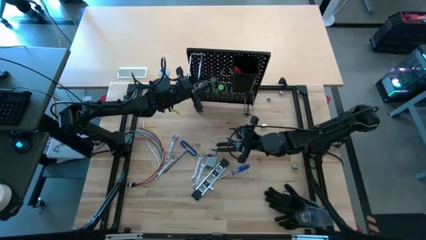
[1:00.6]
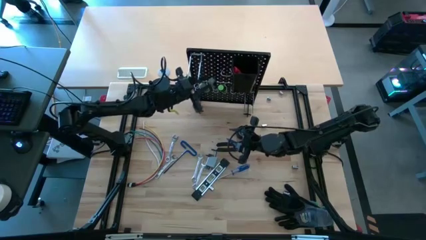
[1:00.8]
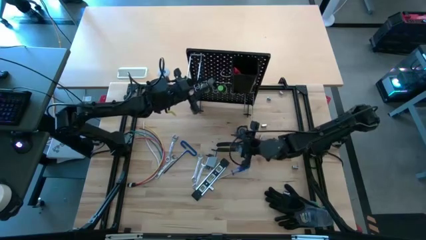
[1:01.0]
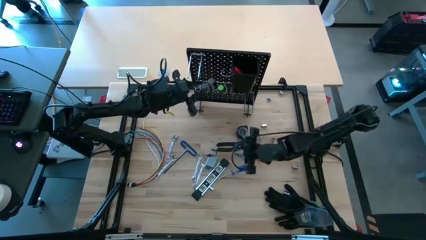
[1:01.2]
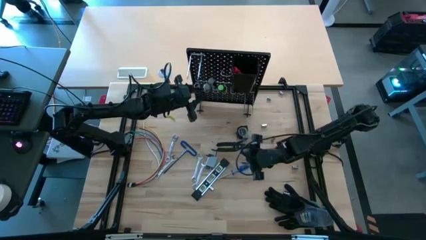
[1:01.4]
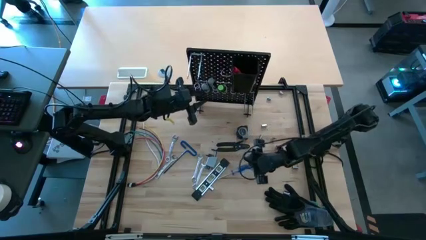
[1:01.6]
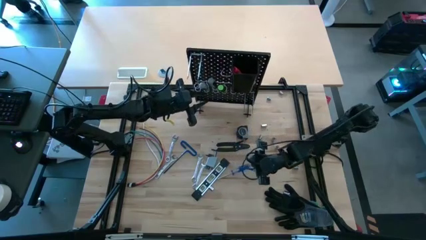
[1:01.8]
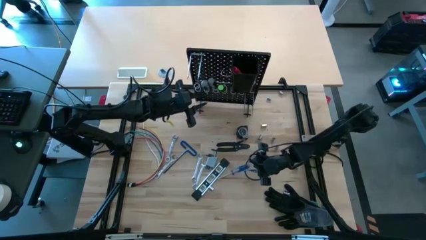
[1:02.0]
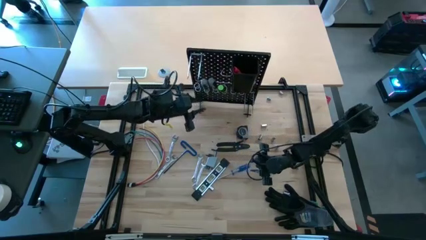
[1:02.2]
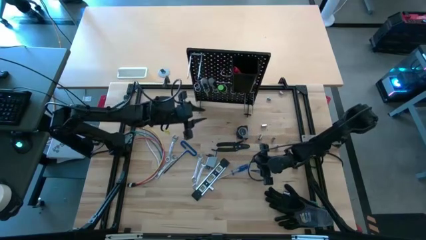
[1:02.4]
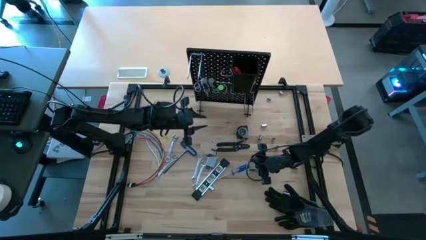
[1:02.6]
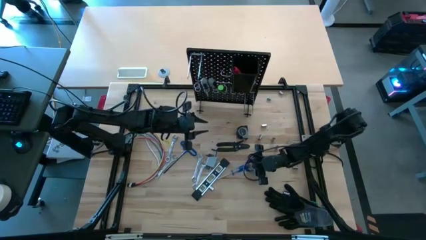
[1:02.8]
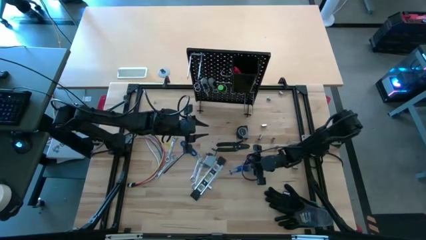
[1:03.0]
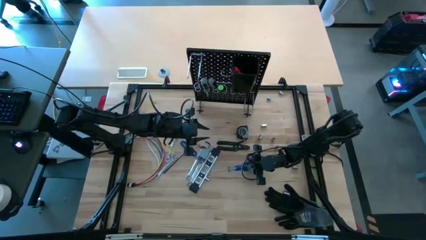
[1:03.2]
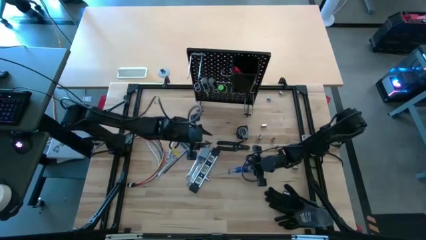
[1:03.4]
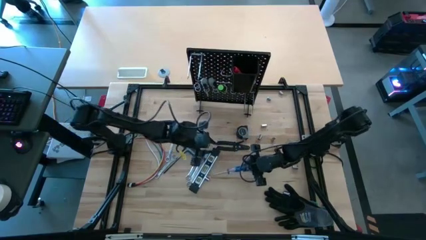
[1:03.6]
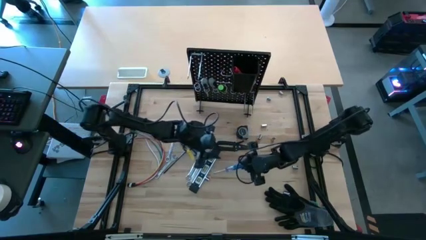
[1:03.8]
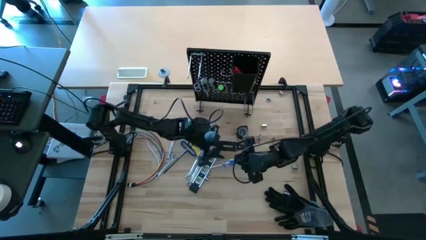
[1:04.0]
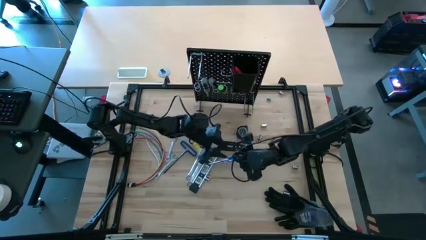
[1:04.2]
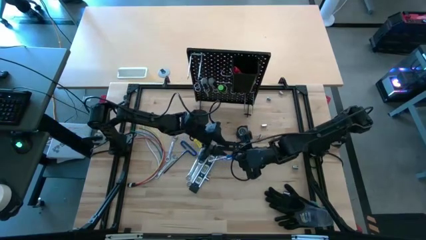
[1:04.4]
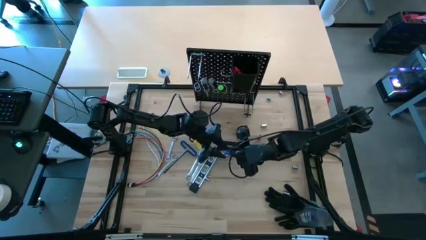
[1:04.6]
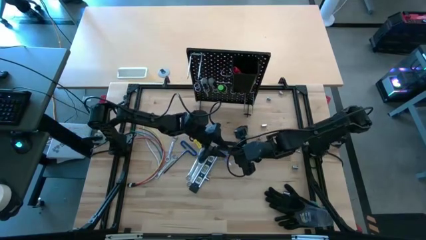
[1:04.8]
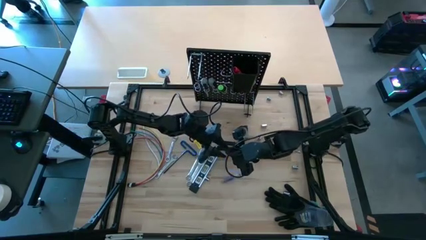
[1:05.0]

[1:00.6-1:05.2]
Task: Hang tools onto peg board
Hang the blue screwdriver on the peg board

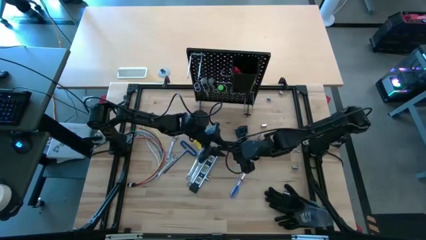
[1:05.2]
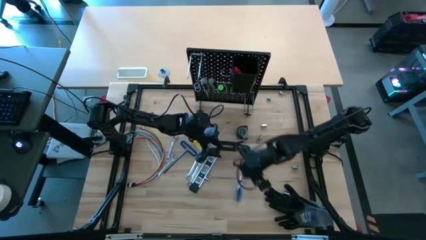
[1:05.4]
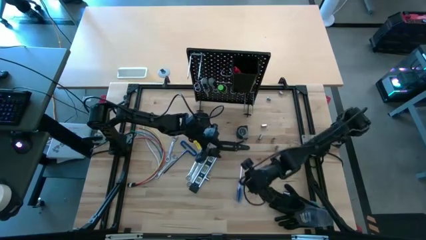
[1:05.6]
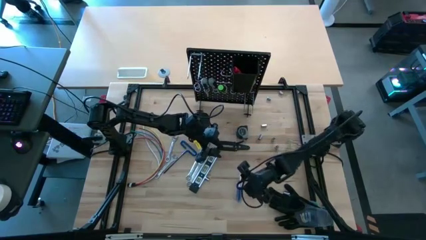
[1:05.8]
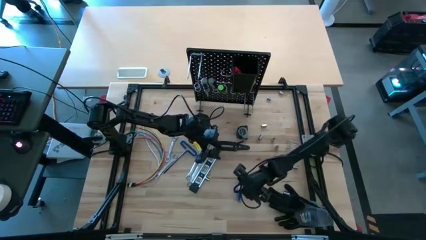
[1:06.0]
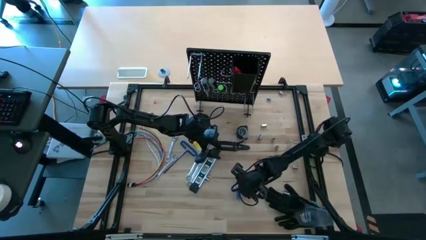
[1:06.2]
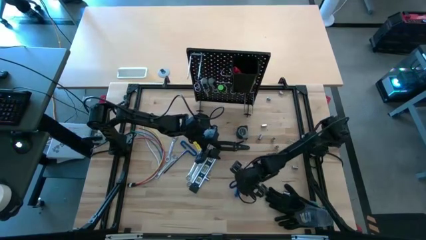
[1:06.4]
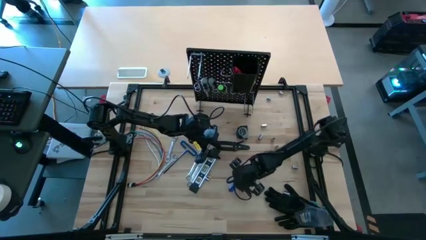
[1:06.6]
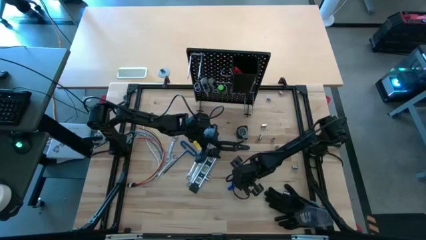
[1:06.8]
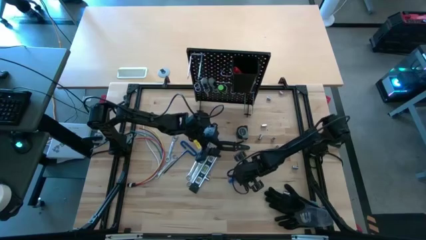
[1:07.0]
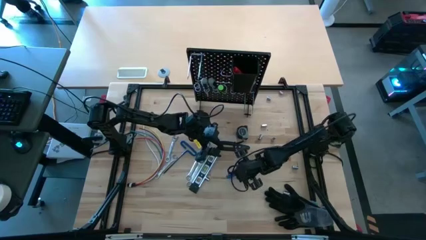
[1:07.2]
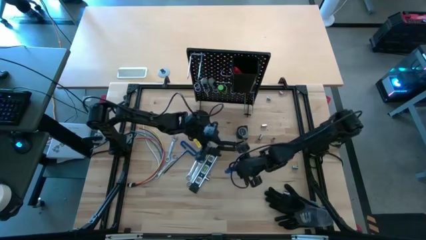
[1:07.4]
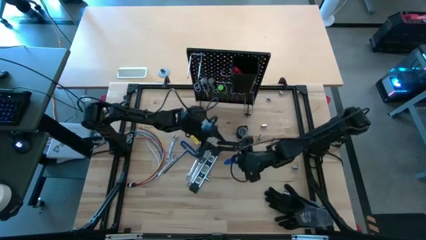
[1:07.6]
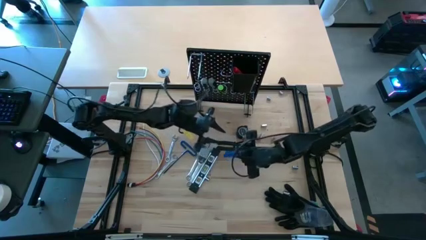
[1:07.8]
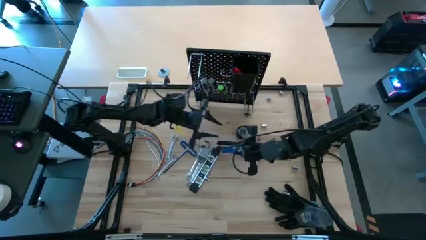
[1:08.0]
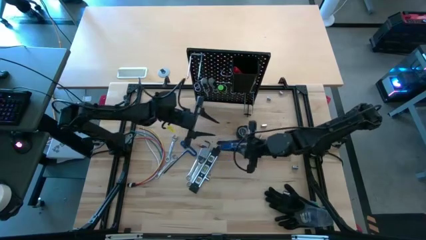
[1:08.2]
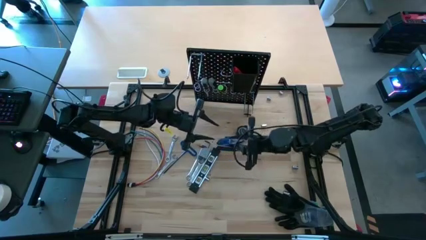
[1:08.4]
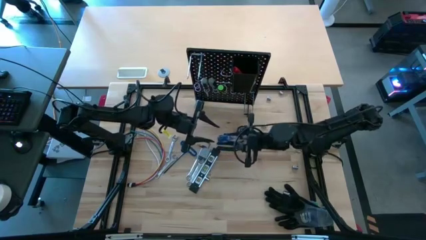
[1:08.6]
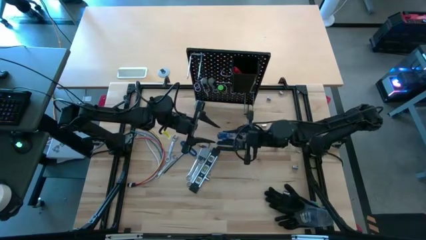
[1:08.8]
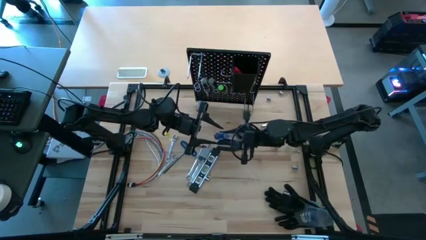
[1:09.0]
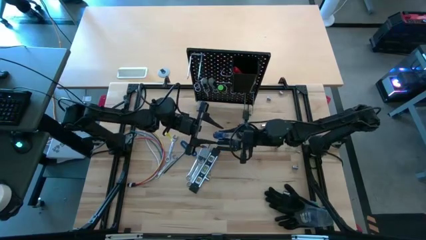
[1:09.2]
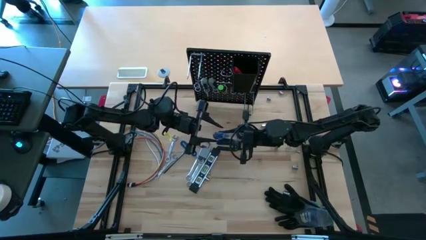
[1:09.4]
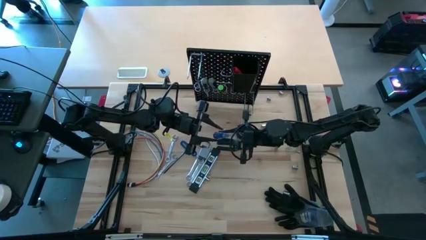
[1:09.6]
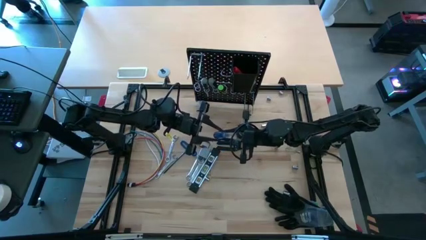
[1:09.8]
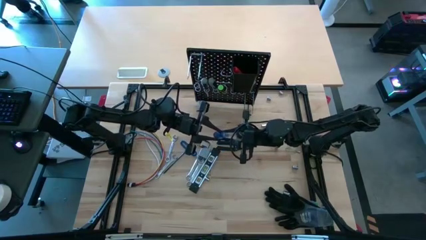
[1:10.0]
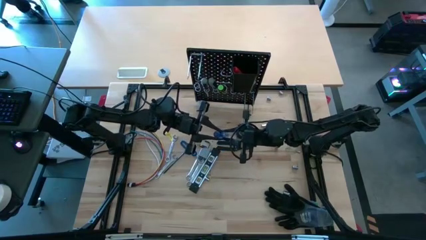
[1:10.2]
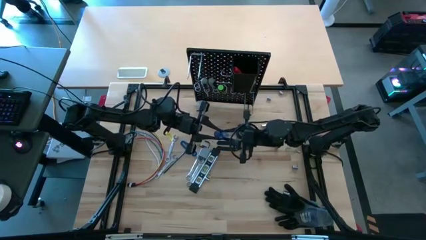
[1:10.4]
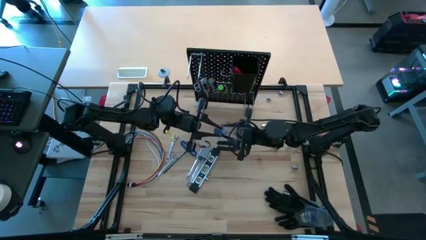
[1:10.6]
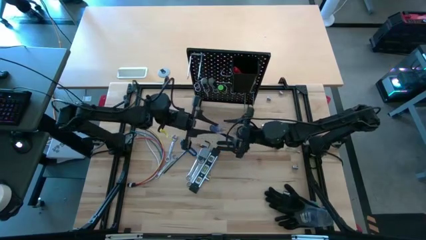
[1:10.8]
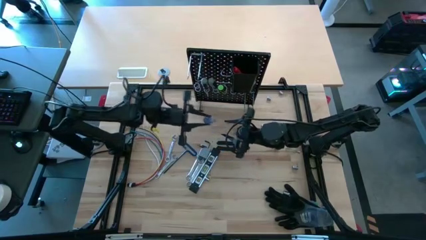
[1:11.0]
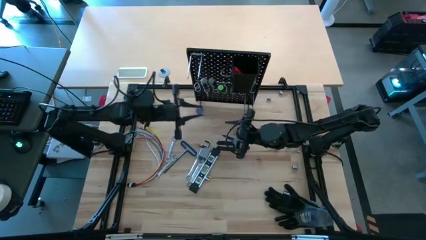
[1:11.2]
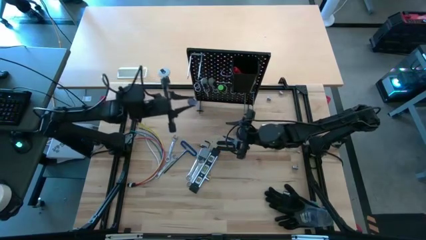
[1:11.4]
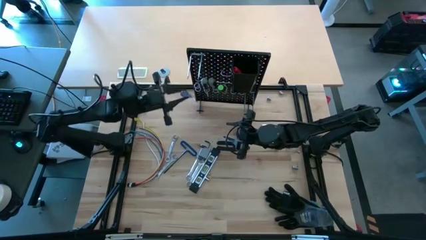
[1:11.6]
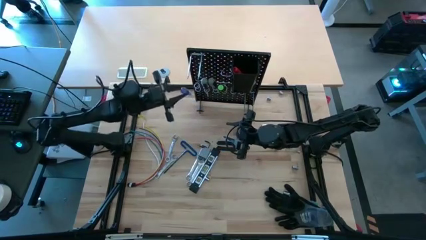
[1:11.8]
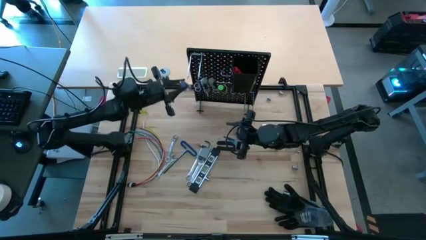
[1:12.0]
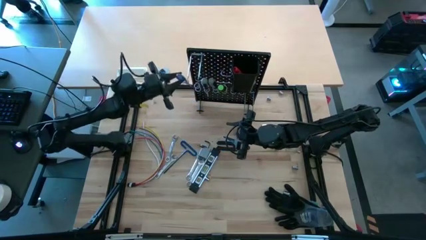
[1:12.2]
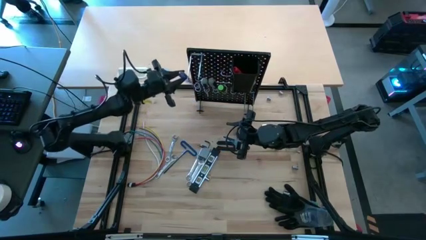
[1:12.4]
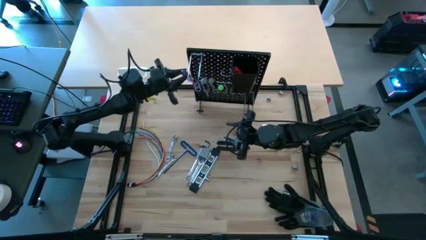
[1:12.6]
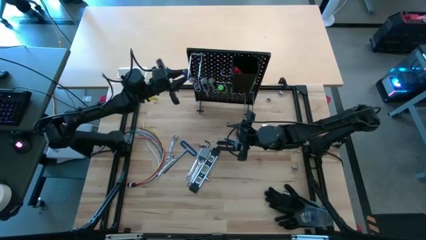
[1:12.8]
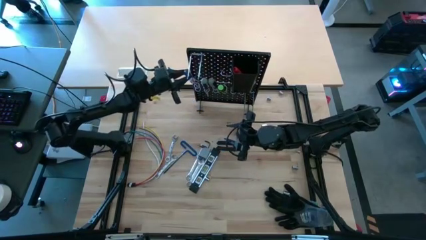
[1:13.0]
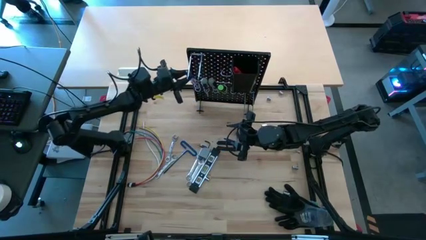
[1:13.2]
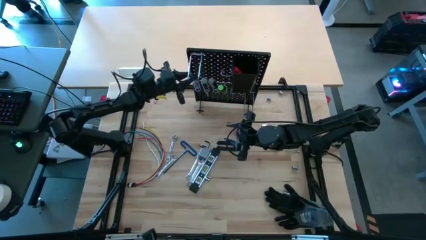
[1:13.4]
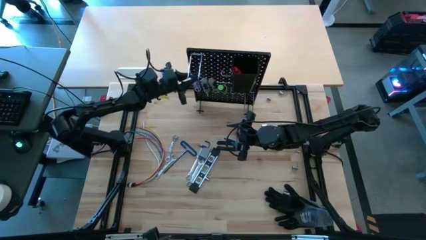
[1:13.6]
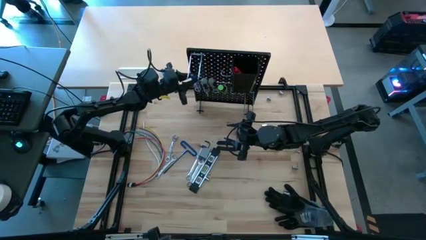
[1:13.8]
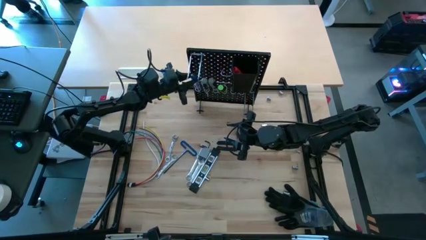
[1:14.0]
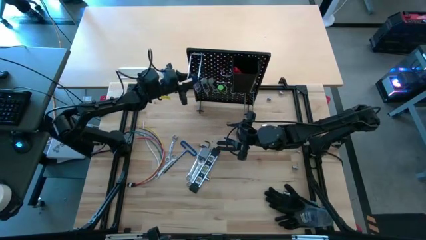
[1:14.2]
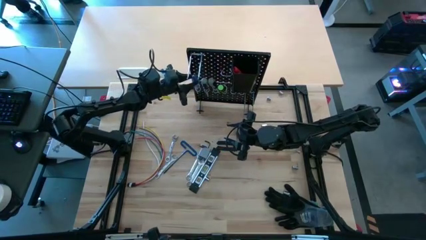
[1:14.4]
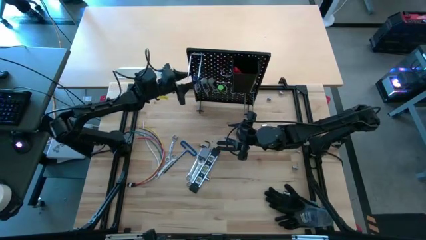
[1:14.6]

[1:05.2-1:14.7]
Hang the blue screwdriver on the peg board
